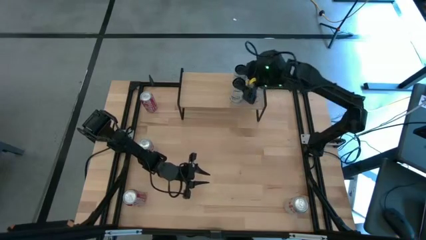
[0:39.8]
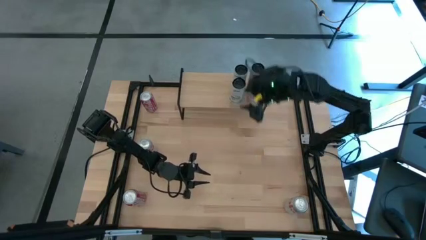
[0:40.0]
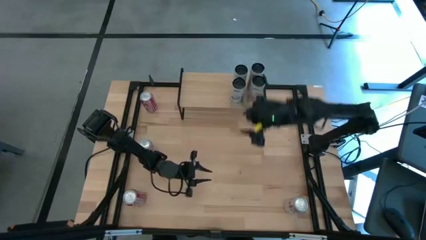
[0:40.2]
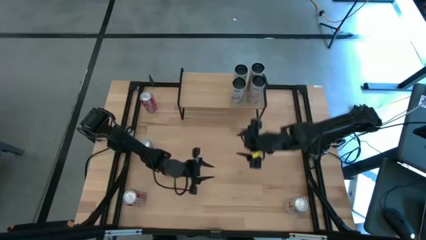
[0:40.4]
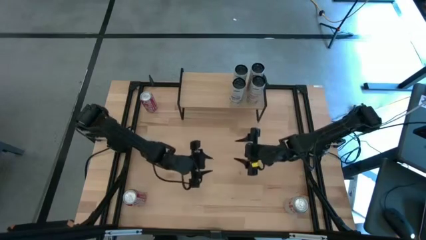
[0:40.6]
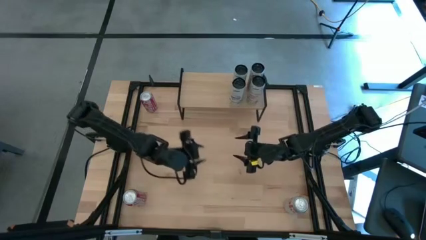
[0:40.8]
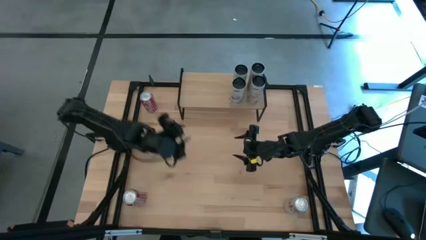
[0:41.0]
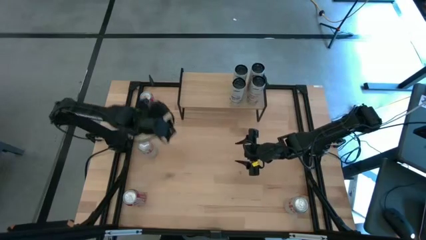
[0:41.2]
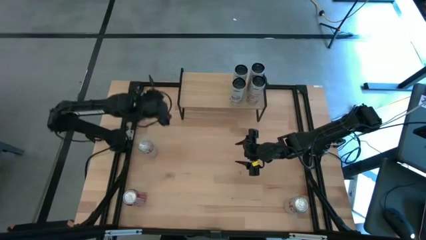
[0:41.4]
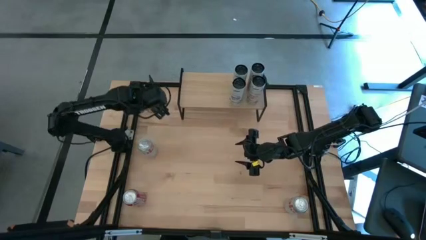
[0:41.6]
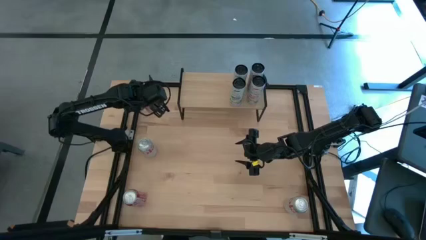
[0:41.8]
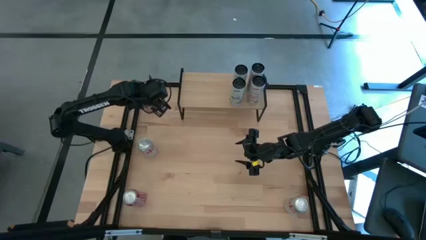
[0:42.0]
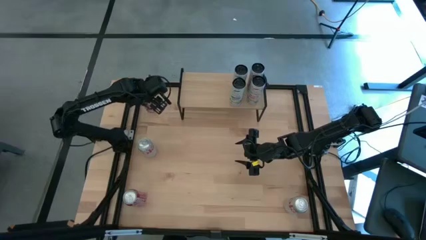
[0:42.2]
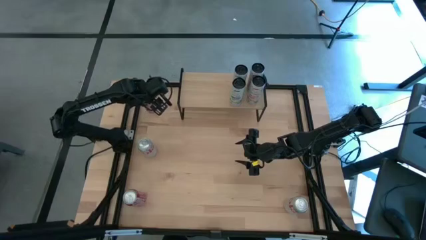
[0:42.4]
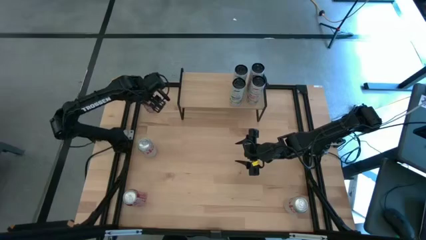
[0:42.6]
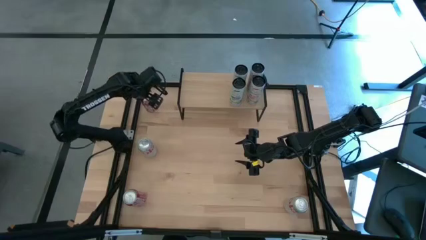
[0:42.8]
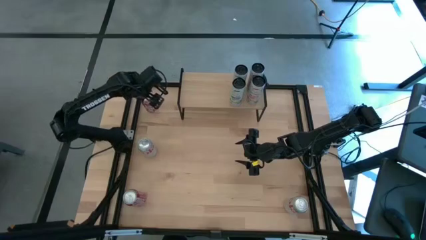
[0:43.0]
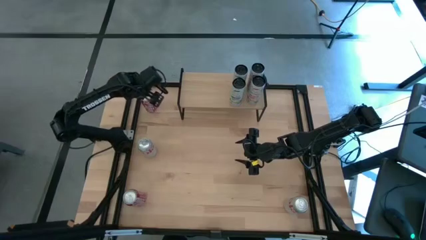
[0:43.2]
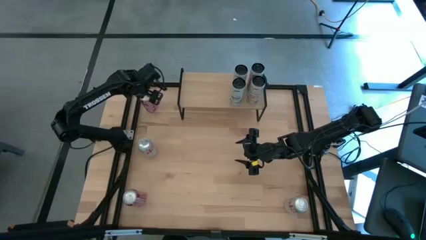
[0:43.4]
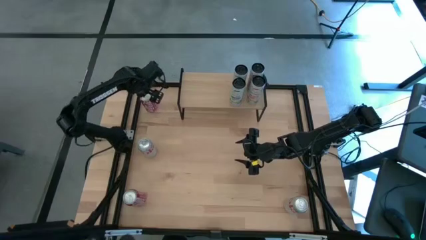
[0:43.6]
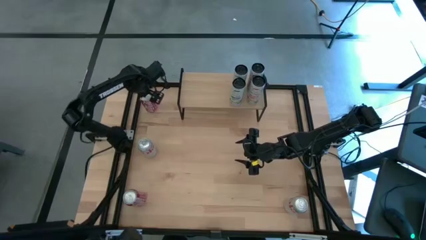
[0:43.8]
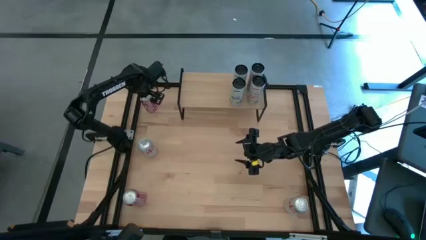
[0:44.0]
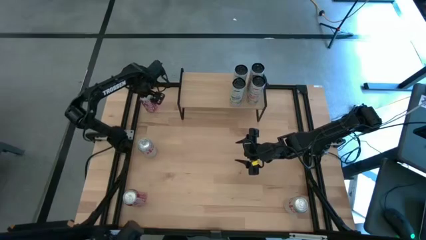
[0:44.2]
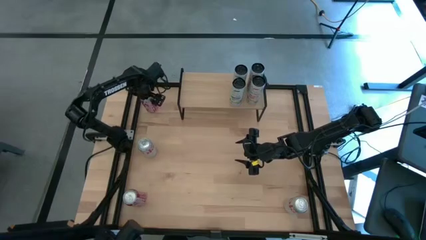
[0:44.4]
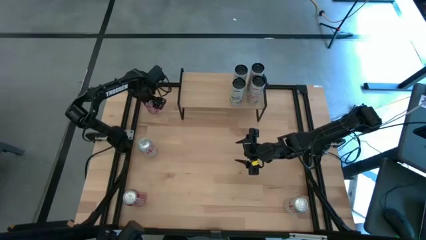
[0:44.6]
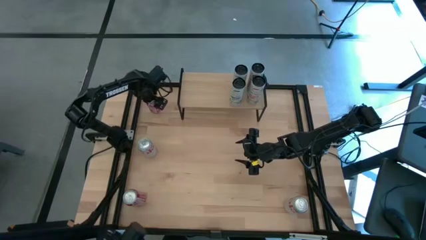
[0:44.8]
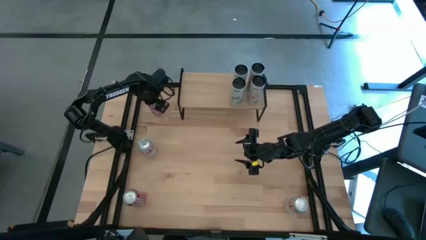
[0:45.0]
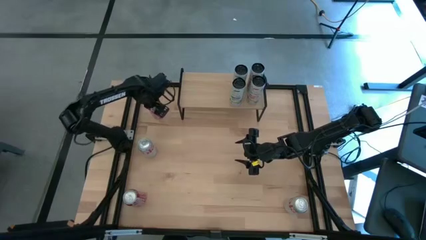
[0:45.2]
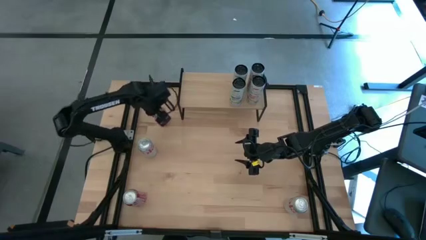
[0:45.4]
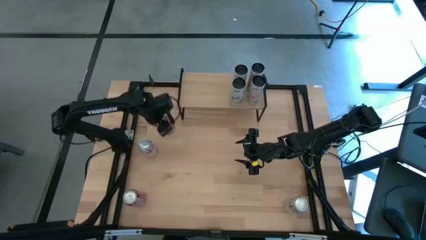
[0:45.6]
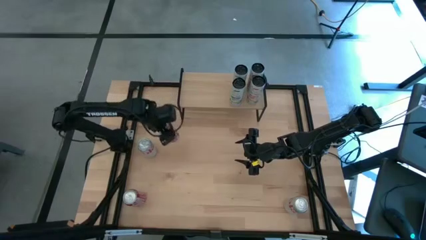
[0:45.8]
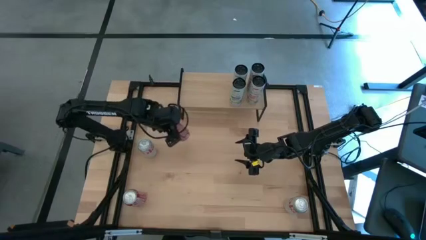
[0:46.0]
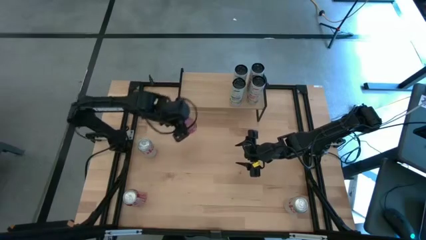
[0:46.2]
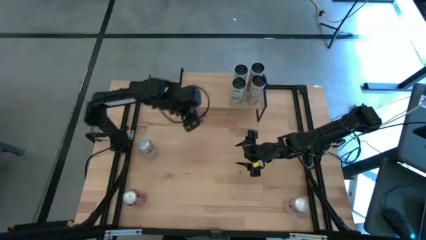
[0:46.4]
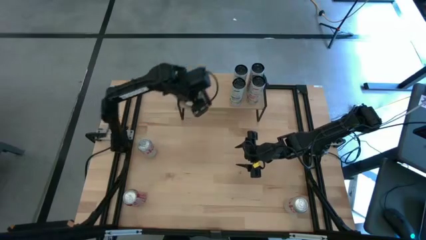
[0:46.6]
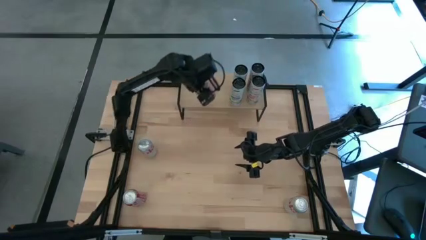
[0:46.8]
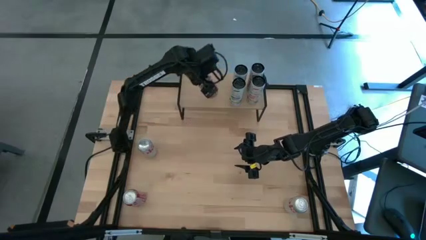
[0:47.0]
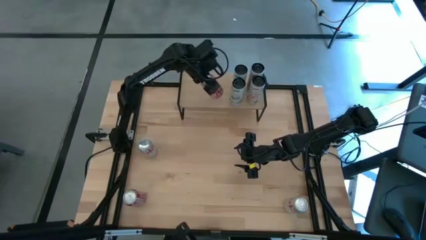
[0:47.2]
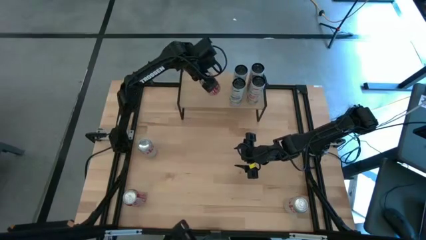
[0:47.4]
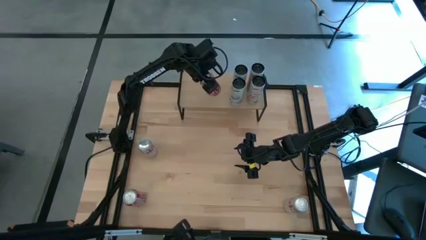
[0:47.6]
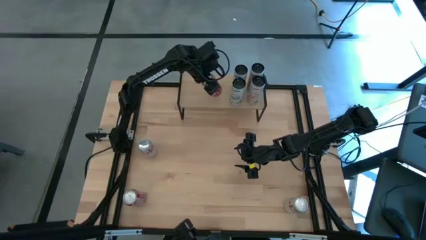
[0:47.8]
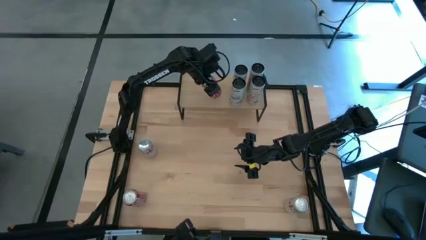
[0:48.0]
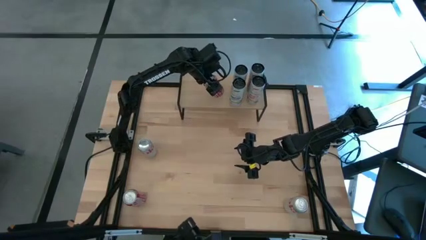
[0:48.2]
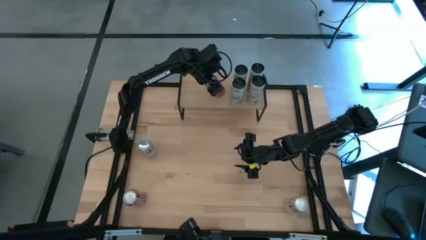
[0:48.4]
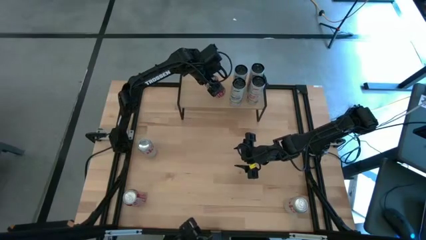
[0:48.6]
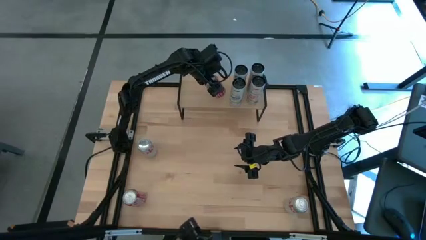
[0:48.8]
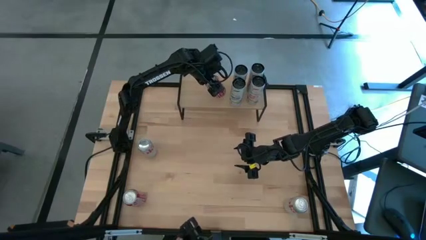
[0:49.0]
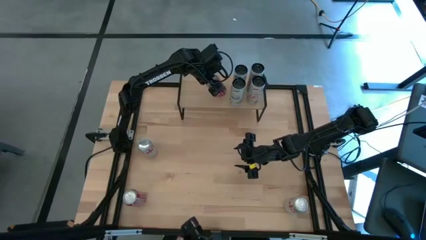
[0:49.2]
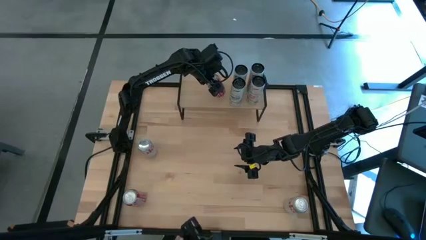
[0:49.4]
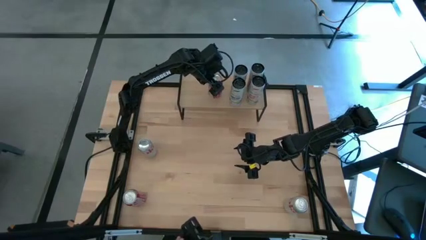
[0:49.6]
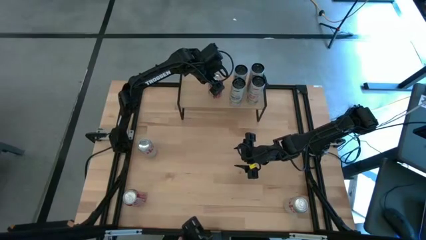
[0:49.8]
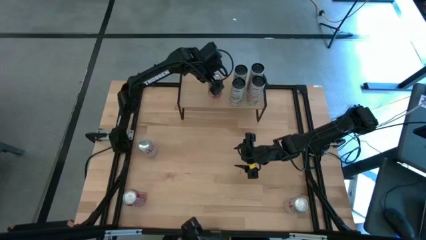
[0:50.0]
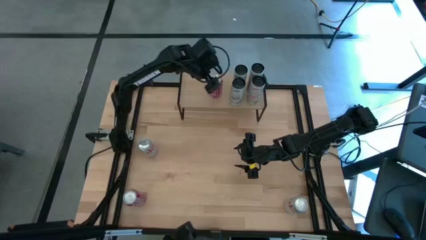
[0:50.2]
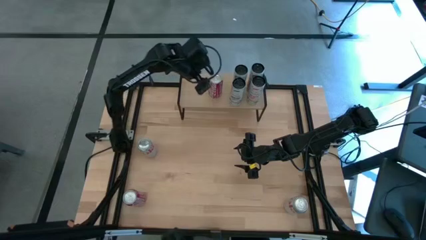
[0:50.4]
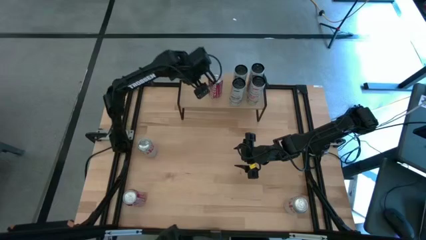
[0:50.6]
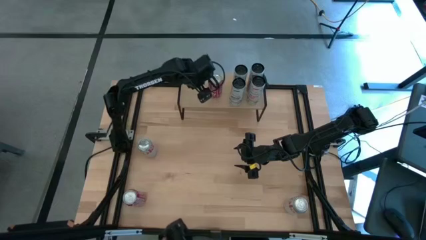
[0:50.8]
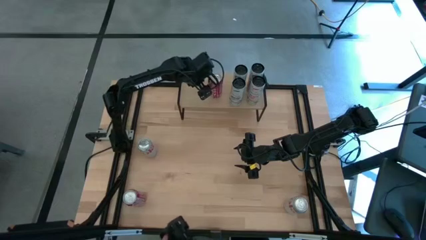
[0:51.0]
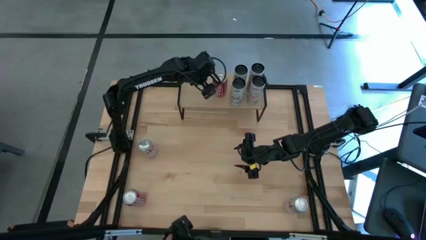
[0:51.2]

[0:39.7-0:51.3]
Task: Place canned beverage on shelf
Put the top red soda can on the shelf

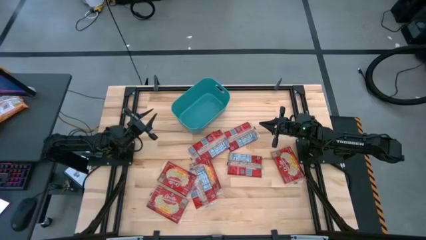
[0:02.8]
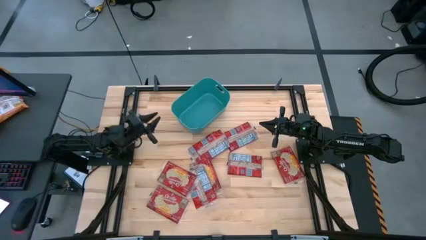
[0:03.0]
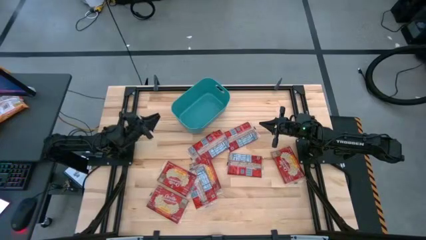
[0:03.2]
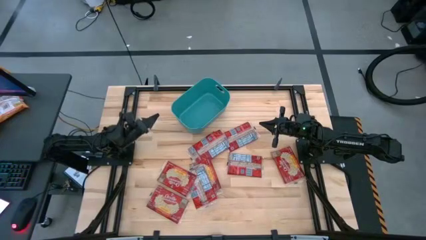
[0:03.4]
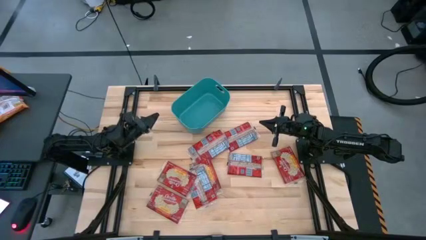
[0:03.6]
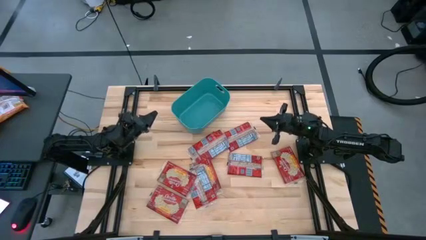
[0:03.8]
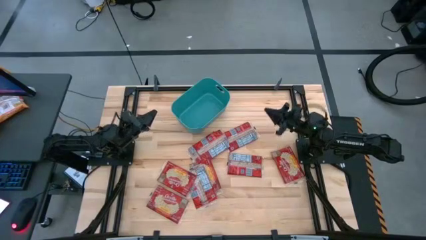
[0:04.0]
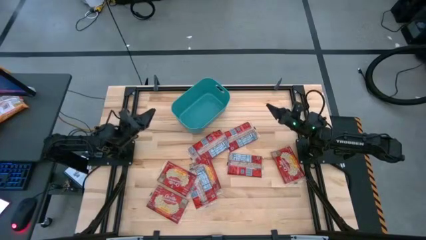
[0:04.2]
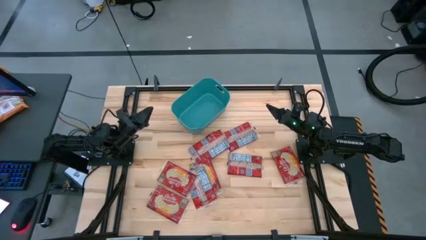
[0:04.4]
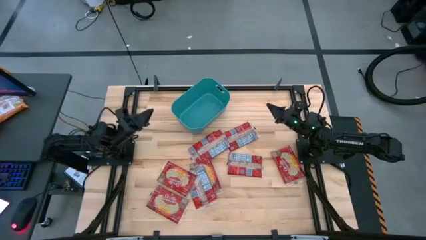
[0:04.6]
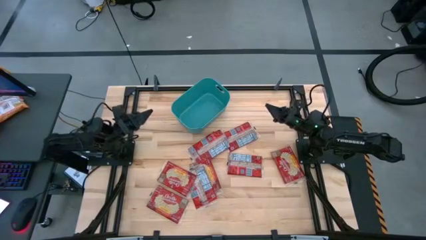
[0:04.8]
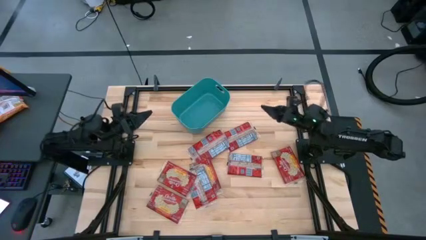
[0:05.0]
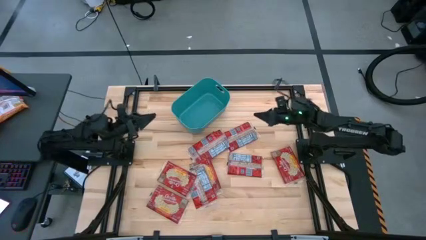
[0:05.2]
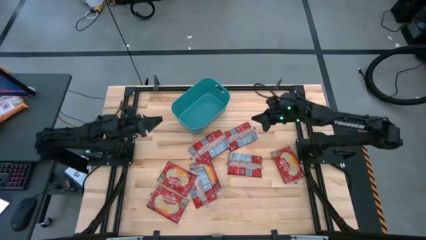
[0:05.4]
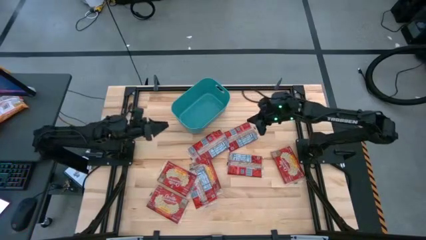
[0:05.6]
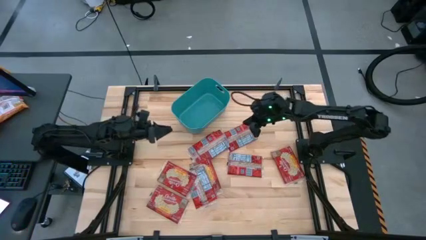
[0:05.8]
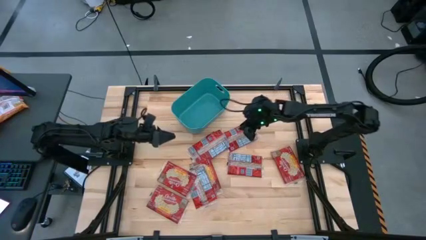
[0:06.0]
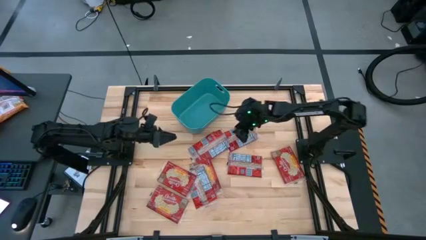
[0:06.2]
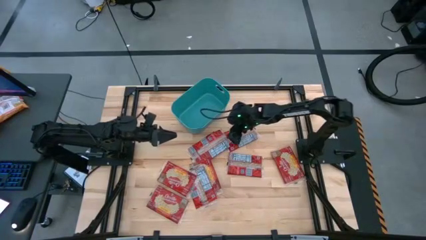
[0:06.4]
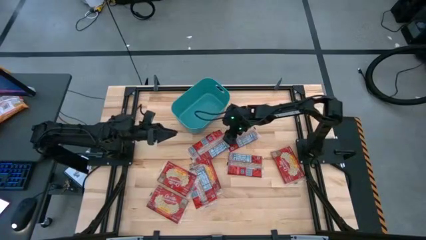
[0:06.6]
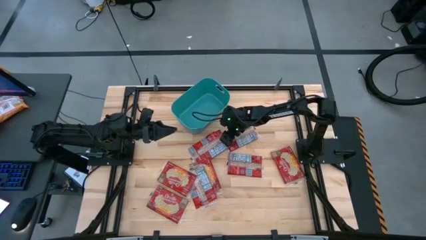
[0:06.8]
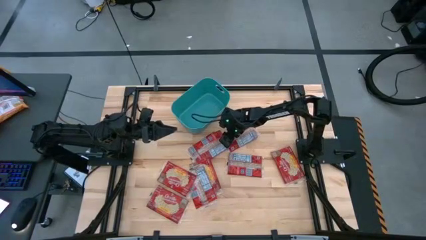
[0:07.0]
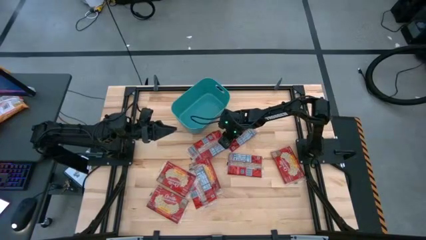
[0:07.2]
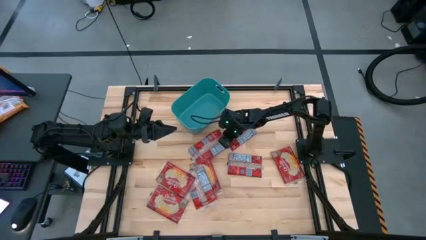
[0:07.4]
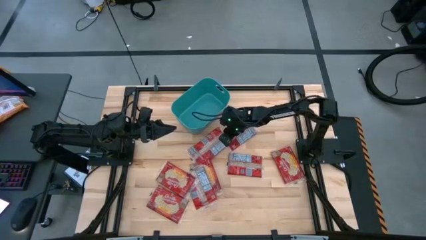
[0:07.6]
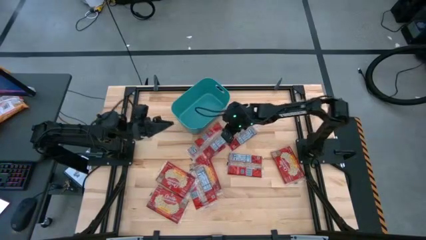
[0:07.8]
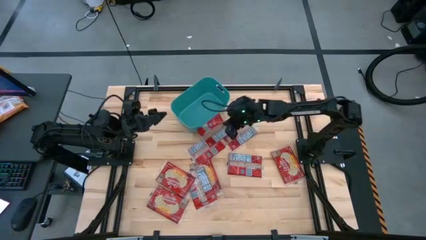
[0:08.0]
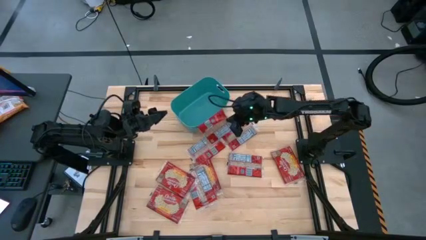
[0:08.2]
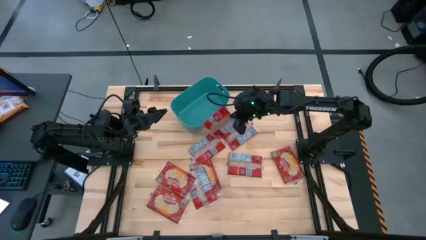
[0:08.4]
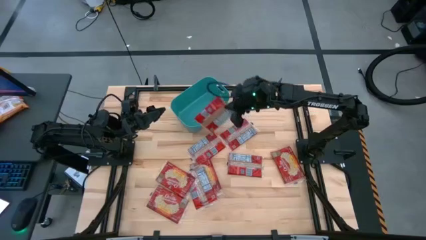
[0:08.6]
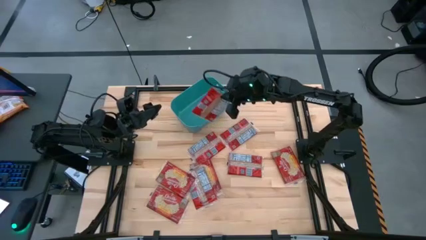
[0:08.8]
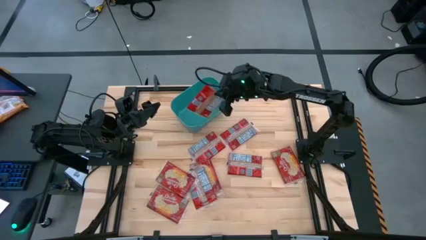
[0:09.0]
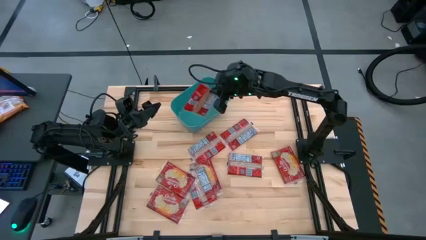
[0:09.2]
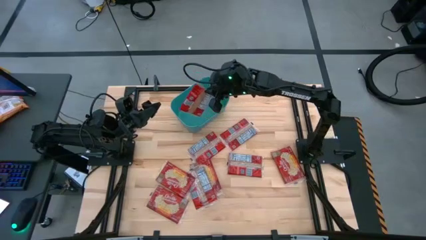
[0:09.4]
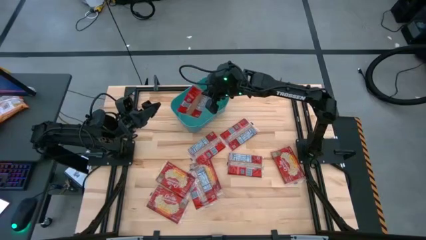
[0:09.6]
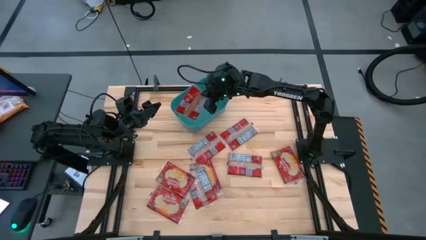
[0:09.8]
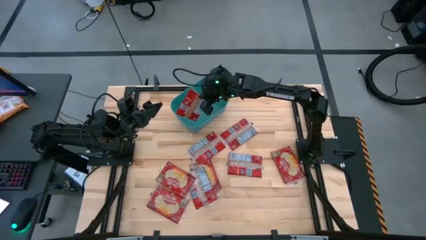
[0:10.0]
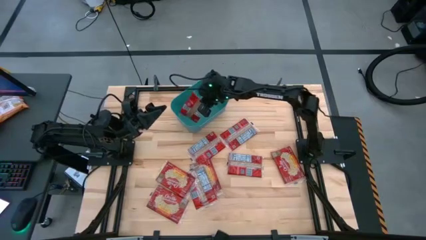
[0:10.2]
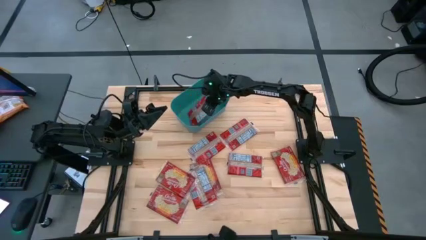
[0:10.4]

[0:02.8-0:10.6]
Task: Sort popcorn bags into baskets
Put the red popcorn bag into the blue bin
